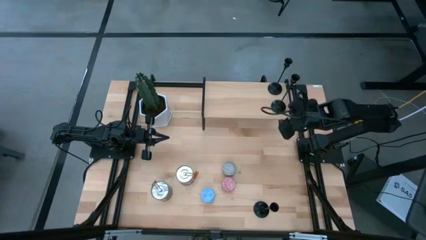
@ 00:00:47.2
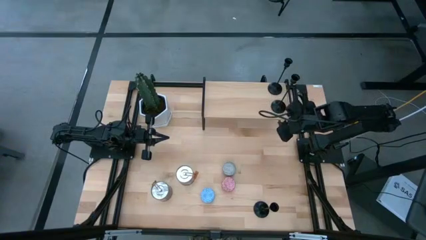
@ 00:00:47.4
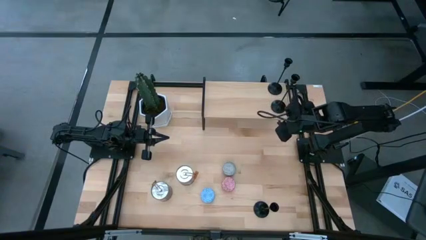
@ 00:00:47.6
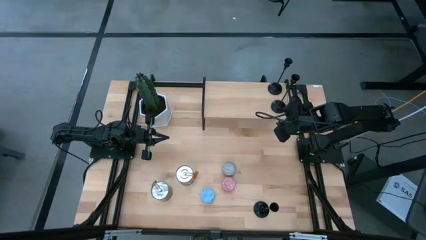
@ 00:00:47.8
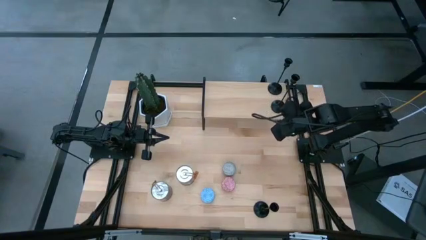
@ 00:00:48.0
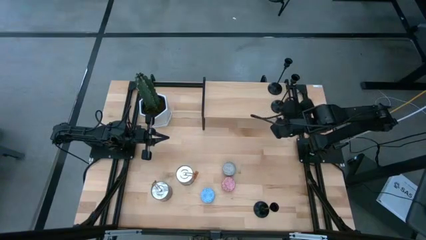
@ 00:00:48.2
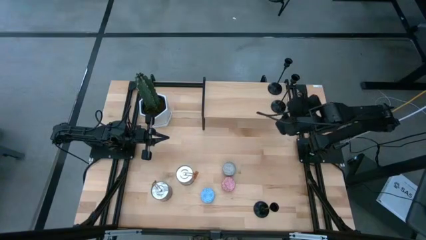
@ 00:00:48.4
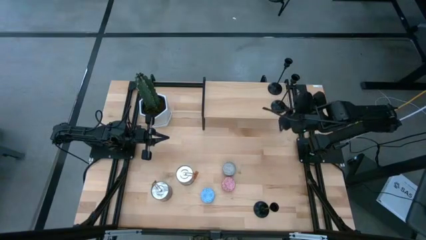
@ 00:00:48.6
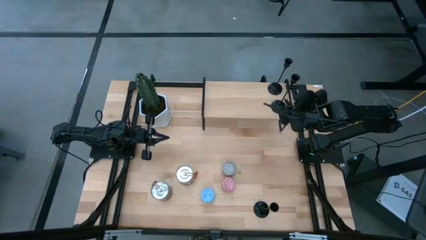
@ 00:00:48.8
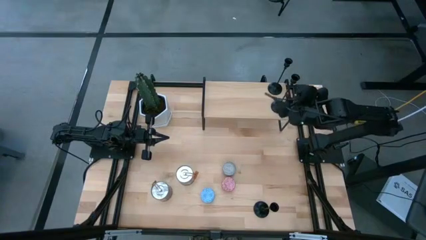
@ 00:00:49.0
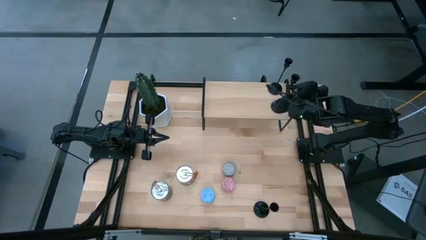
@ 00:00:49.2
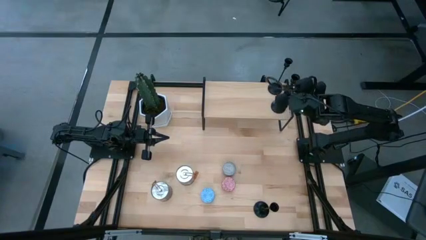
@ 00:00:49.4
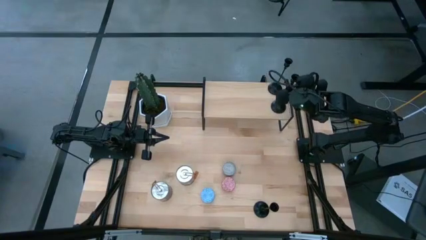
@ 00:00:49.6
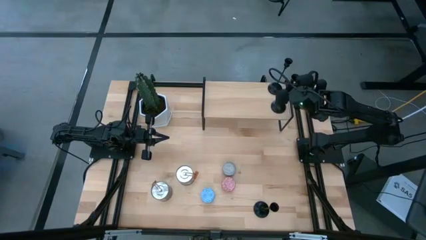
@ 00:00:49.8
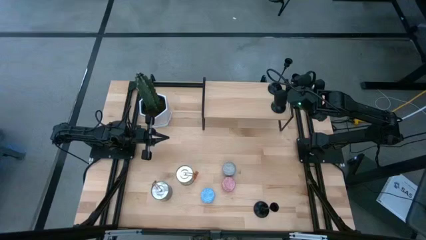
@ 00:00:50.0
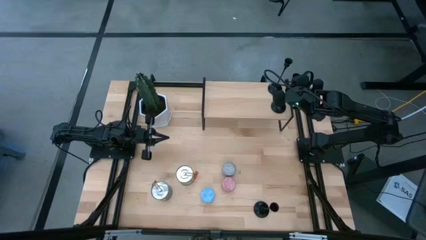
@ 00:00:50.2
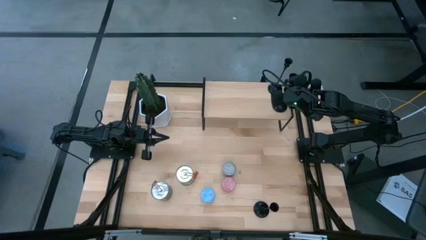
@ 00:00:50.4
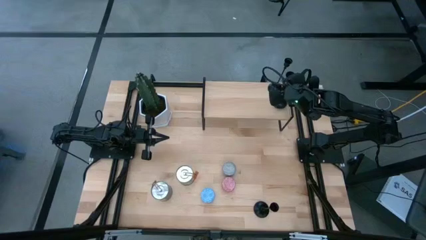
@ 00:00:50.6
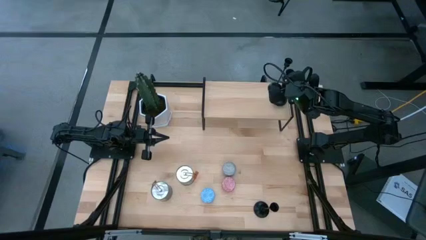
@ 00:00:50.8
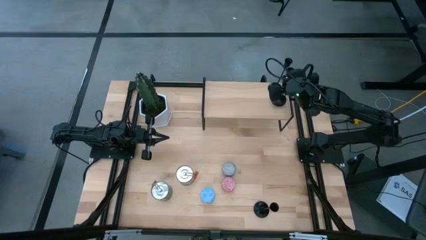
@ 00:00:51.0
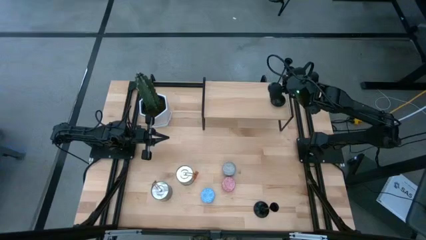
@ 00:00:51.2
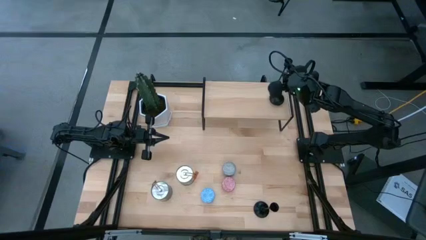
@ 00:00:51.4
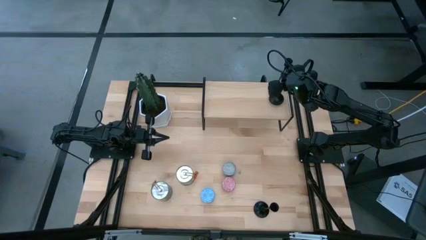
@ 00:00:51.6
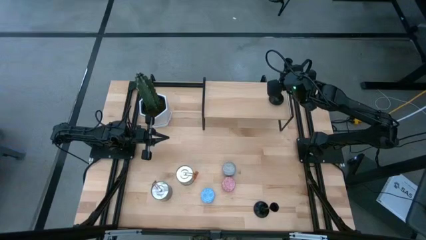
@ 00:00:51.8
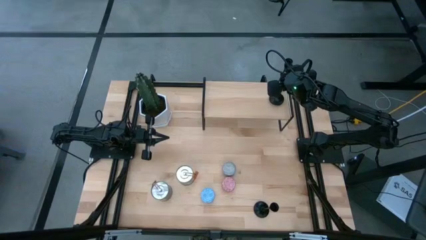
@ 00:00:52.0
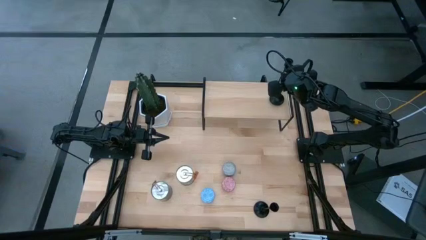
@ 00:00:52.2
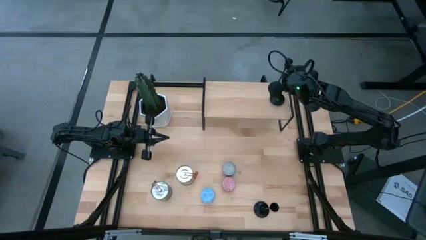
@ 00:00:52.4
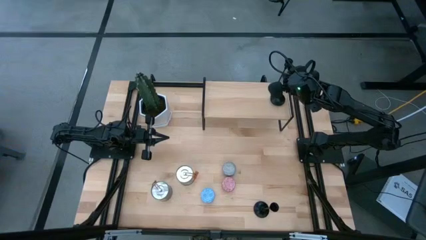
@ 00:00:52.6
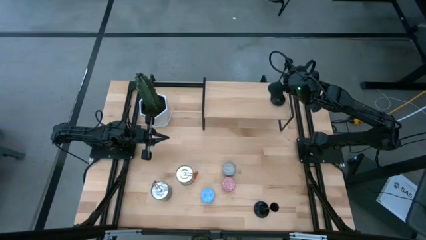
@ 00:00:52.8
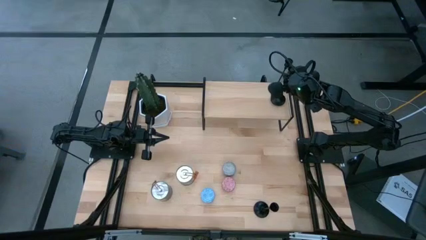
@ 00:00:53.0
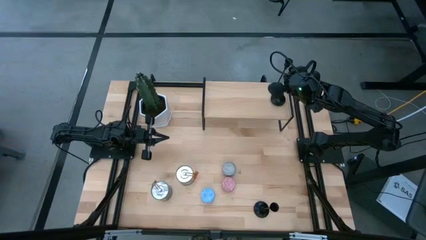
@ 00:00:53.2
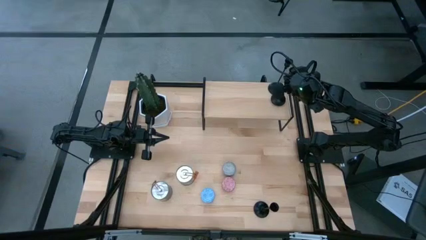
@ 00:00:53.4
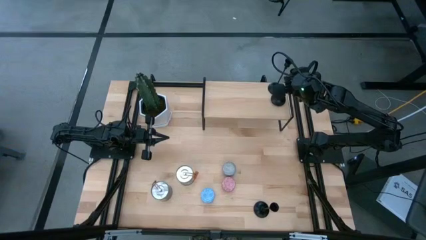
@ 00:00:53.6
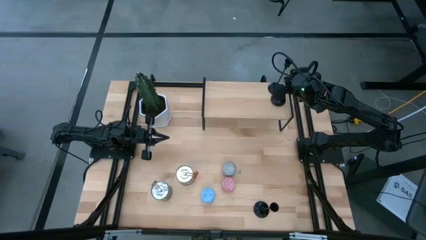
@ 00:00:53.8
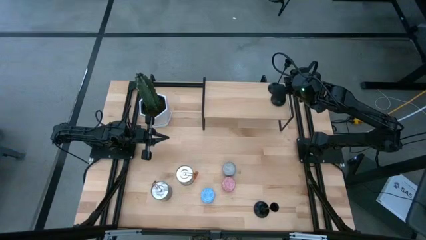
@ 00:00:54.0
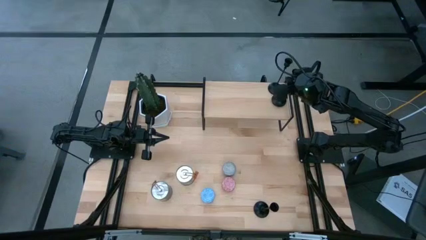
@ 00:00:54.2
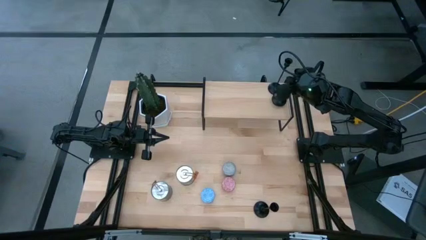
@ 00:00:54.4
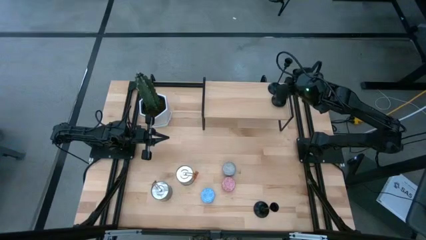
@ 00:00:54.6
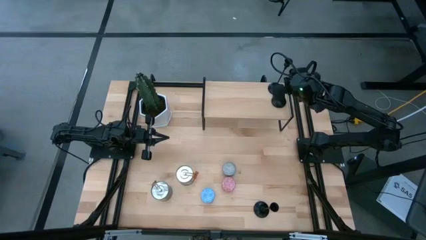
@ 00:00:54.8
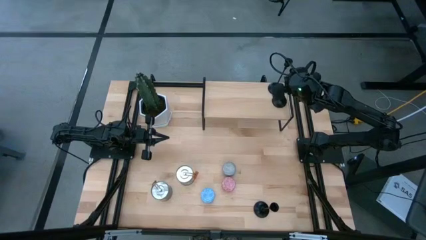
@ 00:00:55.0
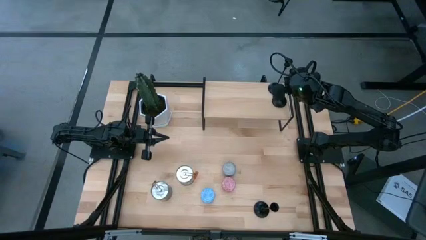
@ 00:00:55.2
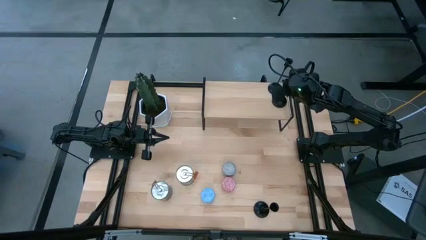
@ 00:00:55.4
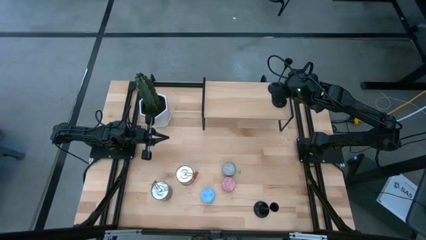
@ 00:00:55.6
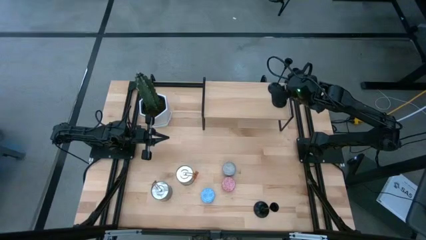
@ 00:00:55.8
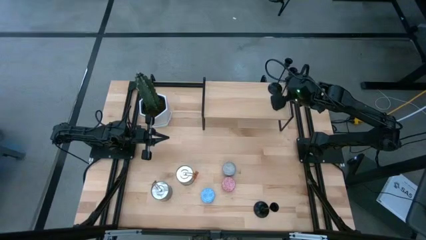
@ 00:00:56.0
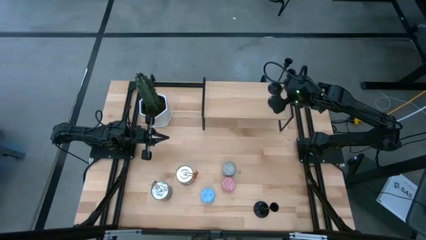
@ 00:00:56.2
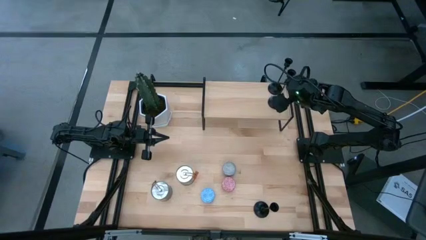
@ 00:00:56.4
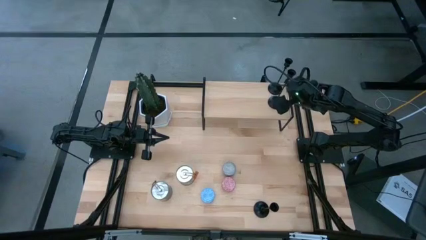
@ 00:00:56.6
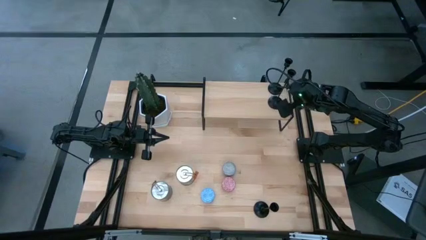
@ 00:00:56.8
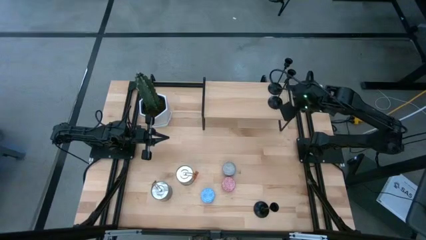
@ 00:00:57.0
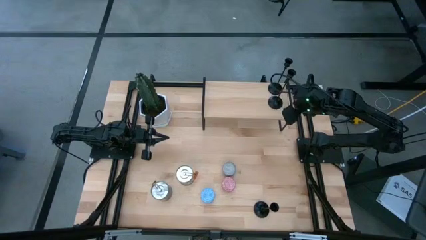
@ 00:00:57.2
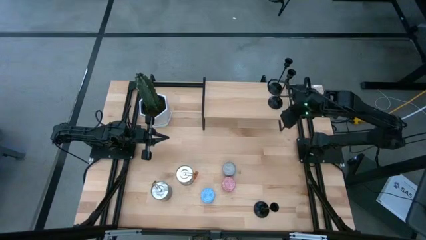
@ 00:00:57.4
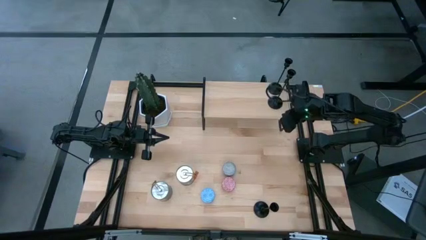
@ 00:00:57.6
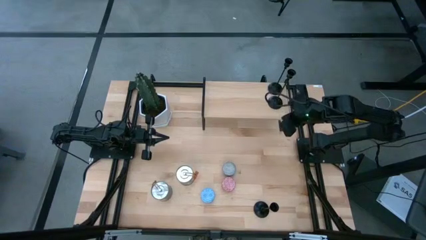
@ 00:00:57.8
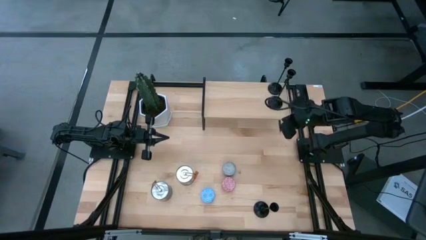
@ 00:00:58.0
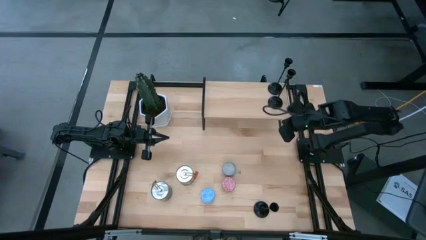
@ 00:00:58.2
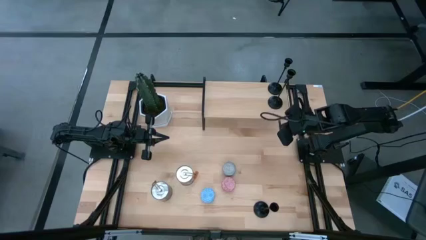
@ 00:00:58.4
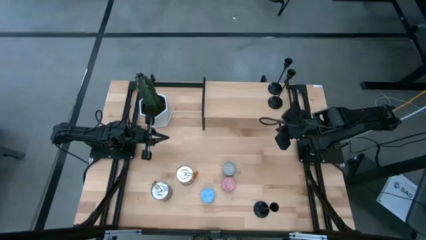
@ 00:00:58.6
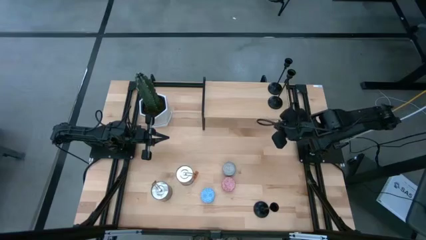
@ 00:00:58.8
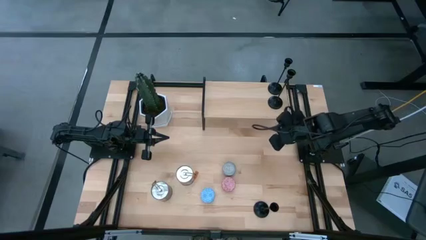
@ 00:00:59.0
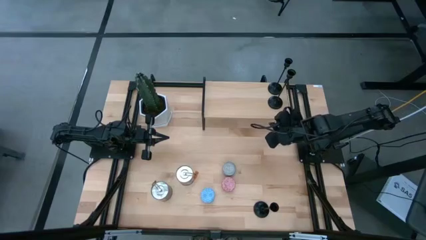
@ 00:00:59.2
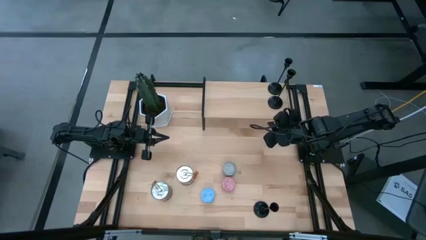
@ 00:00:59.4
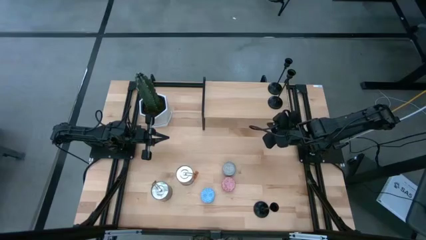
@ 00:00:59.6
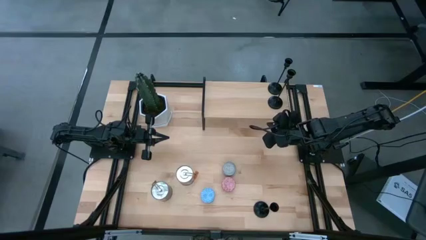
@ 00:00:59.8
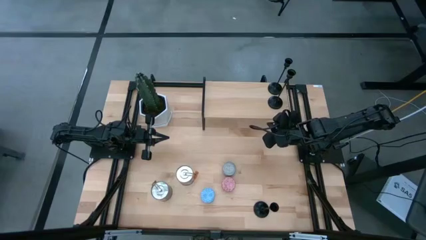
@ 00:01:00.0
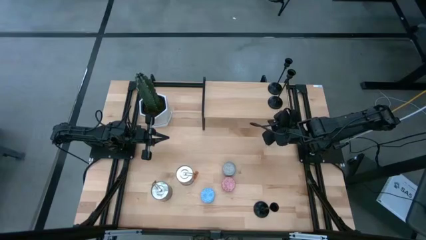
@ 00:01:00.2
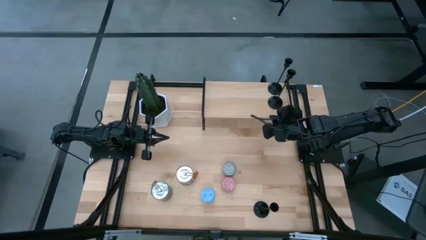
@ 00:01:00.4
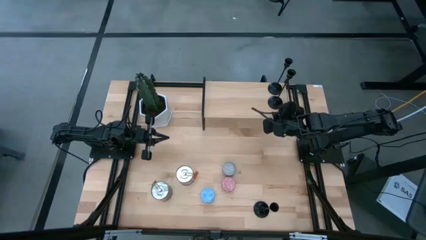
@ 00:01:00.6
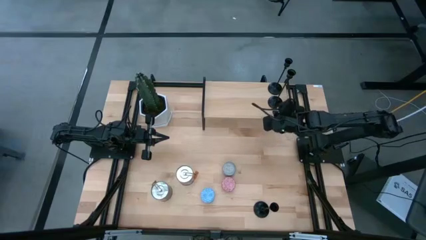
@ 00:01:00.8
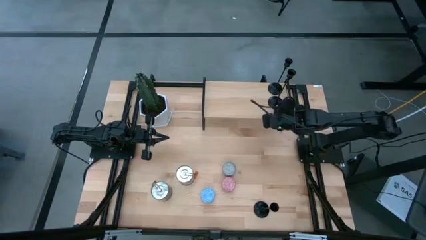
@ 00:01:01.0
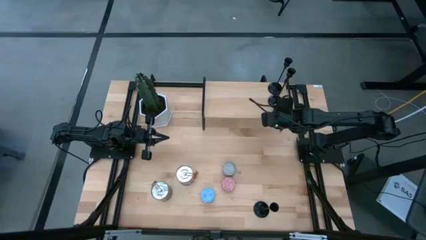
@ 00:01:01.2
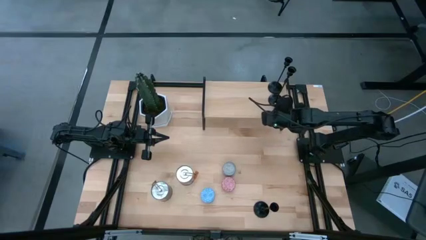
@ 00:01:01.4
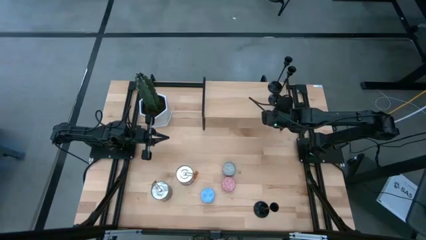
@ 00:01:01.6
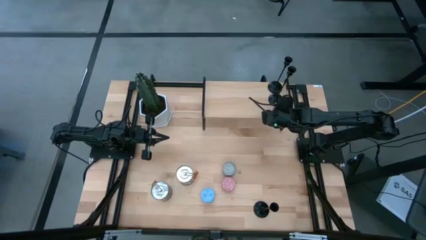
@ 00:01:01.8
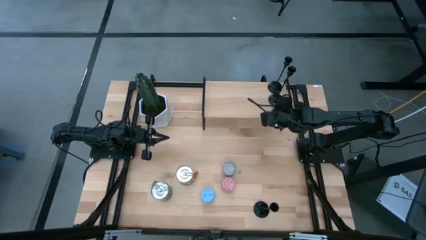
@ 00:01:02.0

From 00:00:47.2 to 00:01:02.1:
Task: Pick & Place candle stick holders
Put the right black candle holder on the shelf

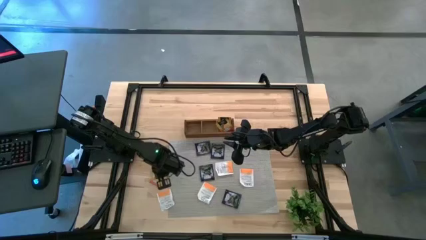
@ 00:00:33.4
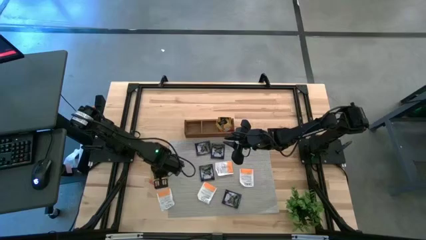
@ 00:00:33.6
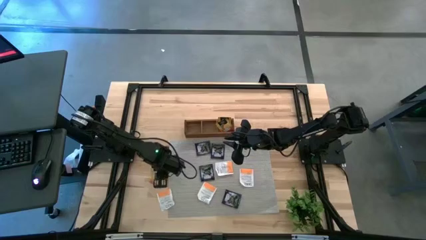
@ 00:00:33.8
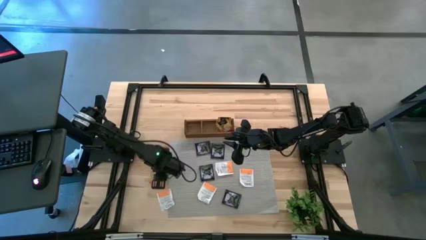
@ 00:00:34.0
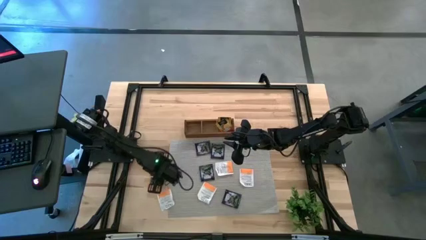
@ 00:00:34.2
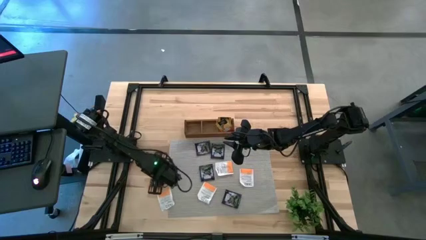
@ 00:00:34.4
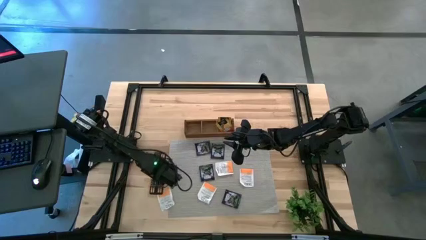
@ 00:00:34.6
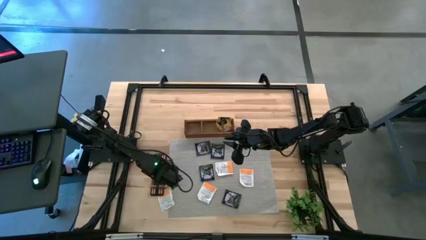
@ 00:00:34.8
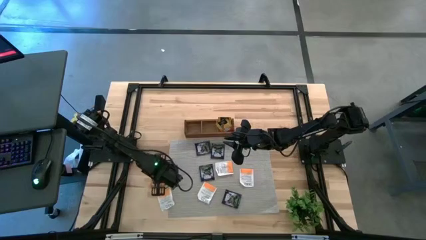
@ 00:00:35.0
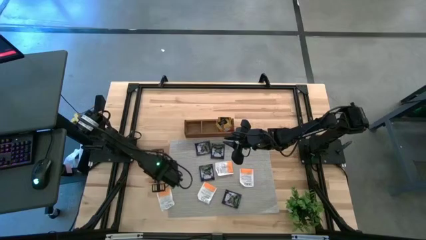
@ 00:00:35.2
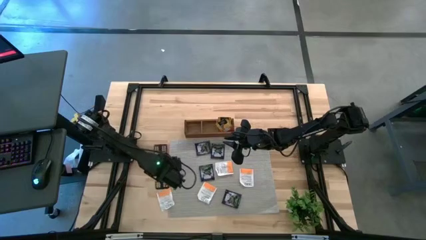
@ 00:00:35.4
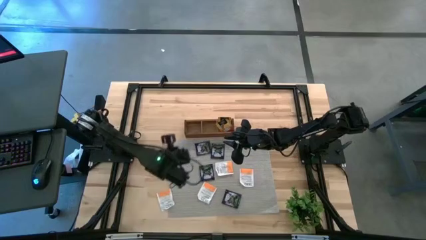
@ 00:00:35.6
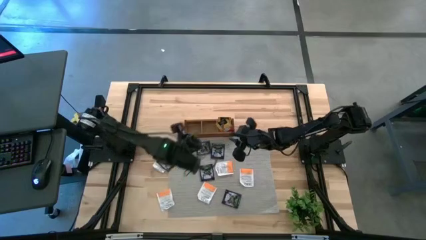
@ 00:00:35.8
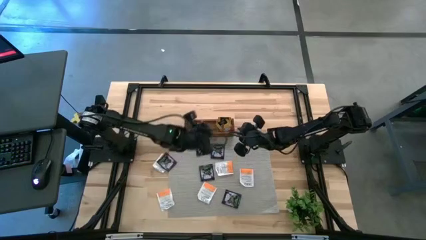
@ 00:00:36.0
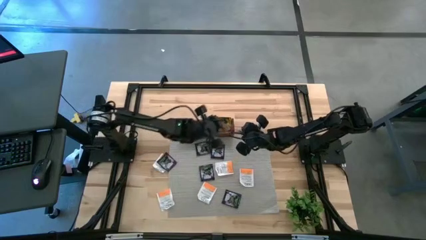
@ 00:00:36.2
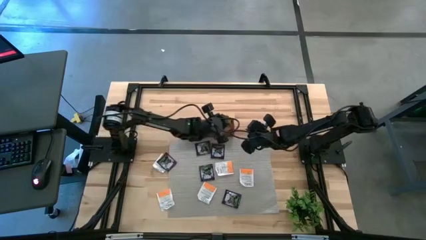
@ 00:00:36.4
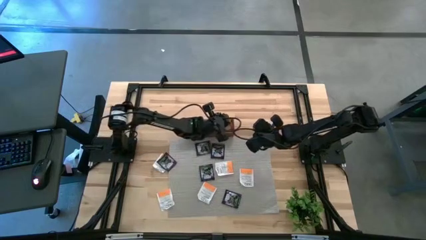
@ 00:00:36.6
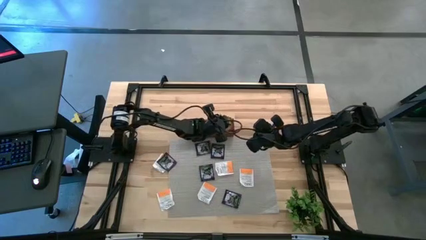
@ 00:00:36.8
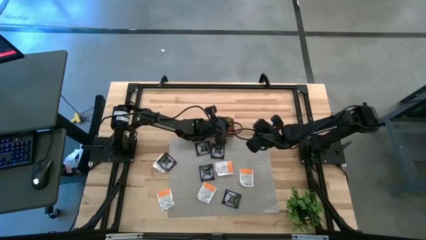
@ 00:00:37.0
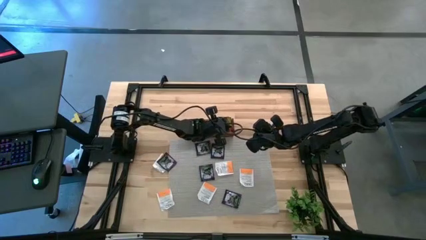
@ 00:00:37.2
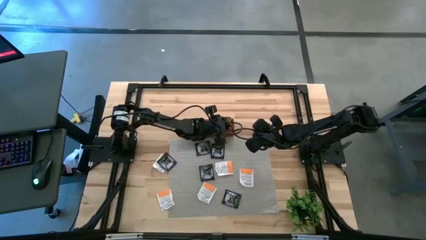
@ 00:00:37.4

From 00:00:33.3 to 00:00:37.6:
Task: Pick & Place Tea
Put the orange tea bag into the right section of the wooden organizer
